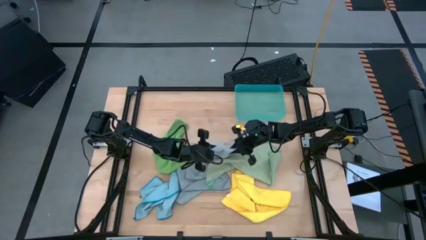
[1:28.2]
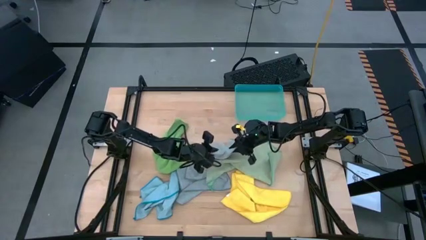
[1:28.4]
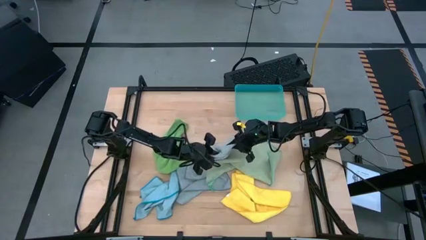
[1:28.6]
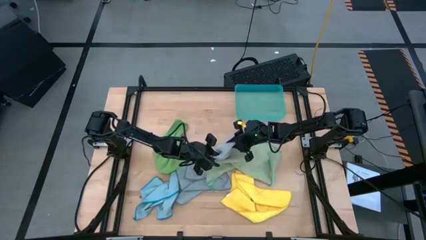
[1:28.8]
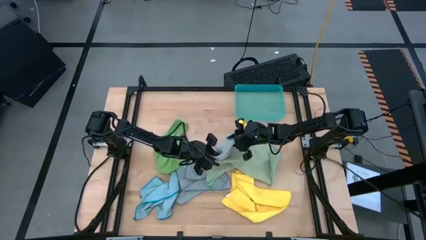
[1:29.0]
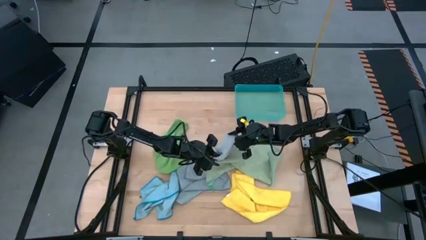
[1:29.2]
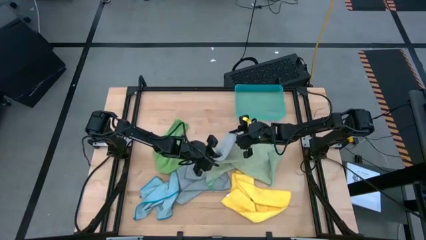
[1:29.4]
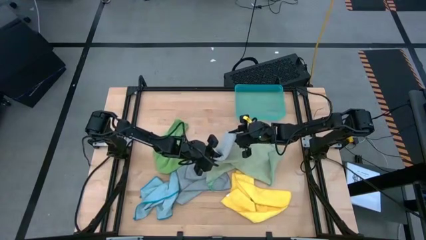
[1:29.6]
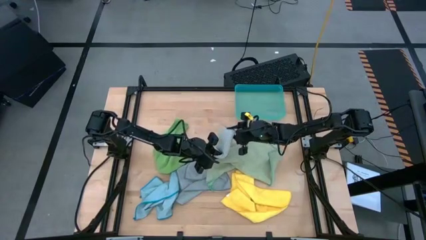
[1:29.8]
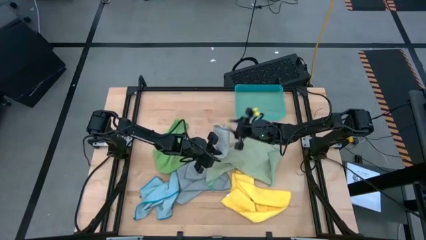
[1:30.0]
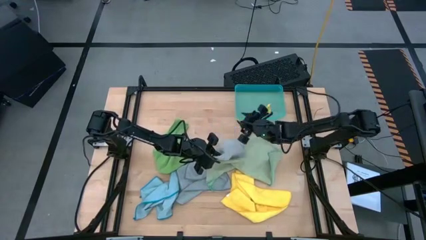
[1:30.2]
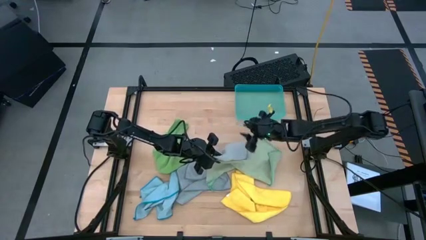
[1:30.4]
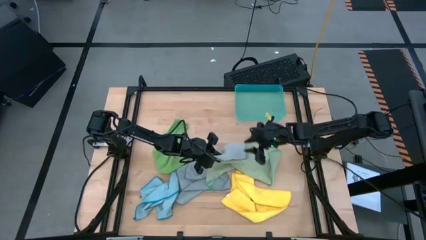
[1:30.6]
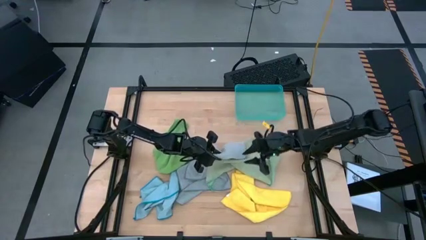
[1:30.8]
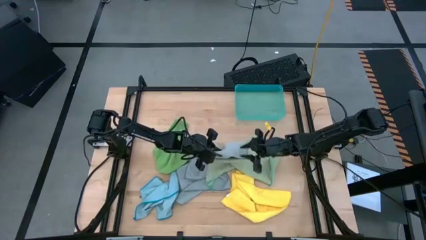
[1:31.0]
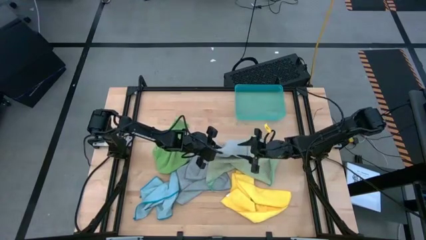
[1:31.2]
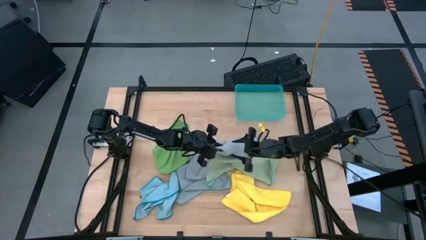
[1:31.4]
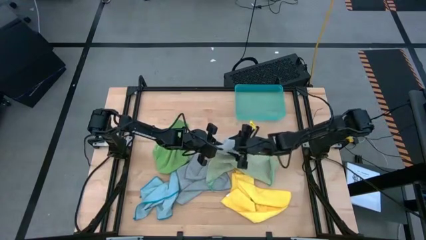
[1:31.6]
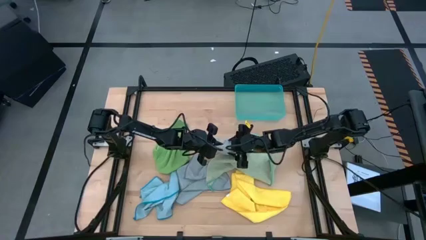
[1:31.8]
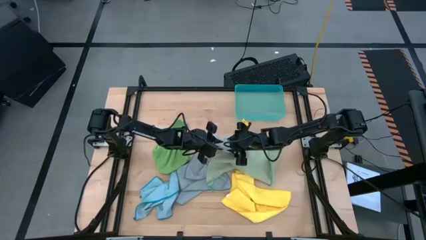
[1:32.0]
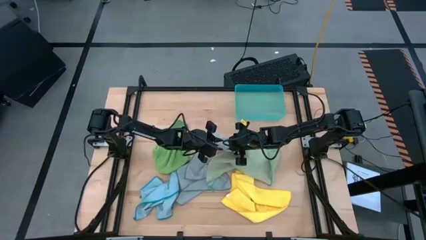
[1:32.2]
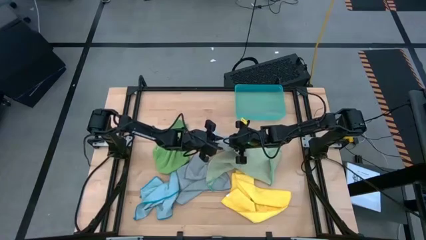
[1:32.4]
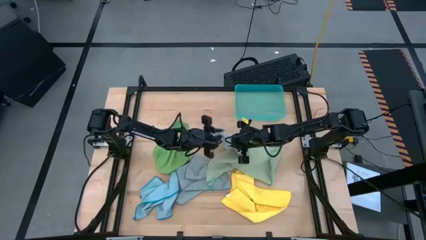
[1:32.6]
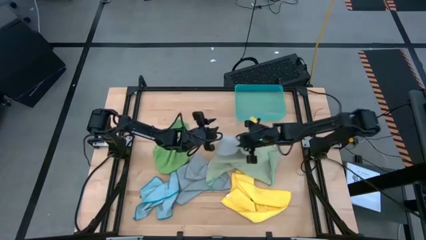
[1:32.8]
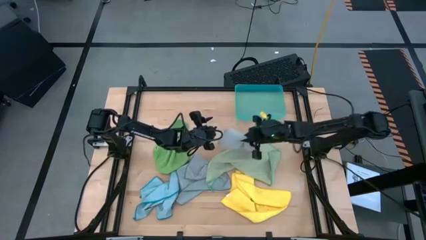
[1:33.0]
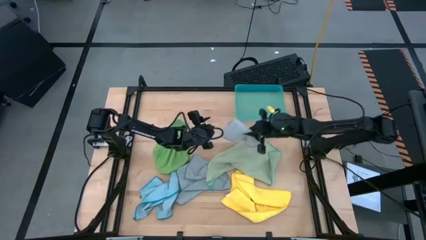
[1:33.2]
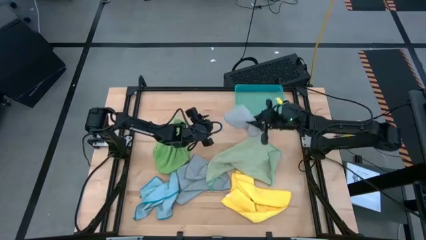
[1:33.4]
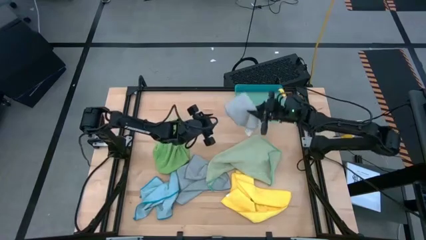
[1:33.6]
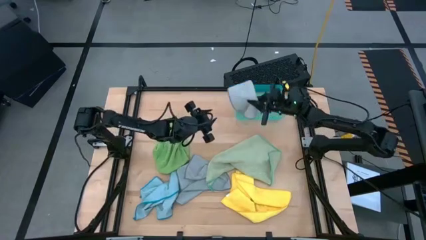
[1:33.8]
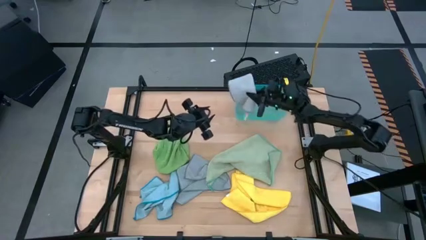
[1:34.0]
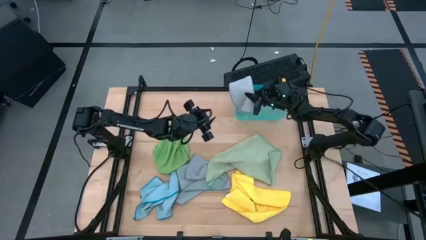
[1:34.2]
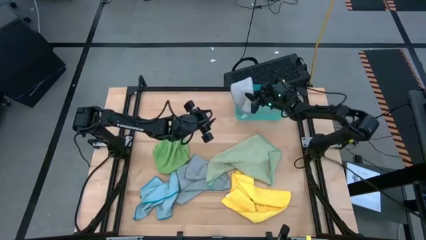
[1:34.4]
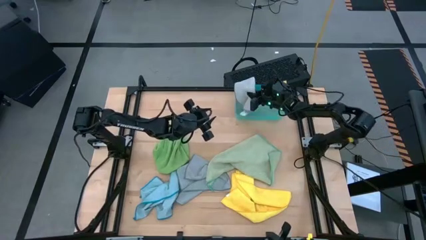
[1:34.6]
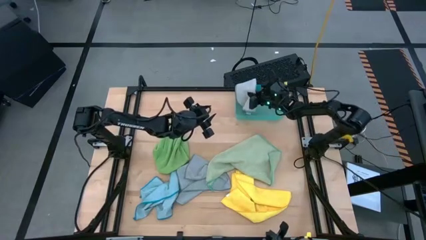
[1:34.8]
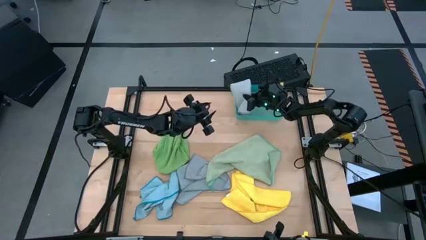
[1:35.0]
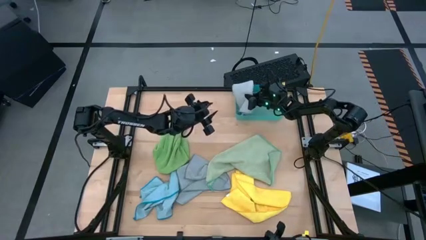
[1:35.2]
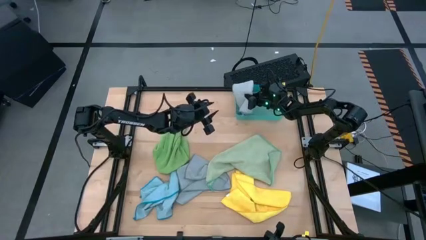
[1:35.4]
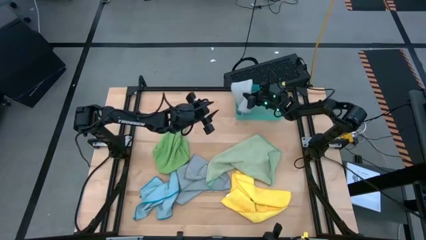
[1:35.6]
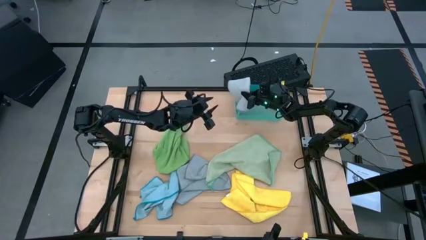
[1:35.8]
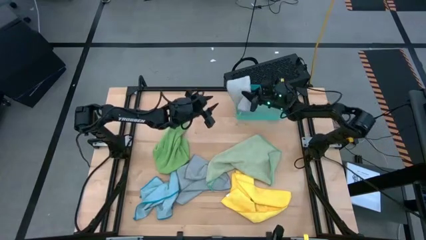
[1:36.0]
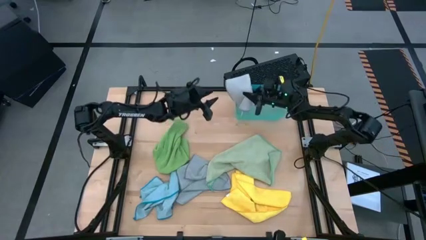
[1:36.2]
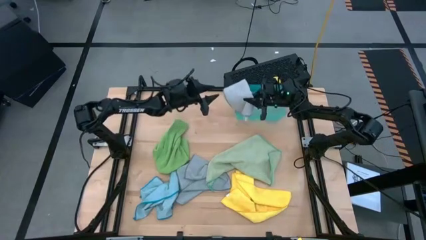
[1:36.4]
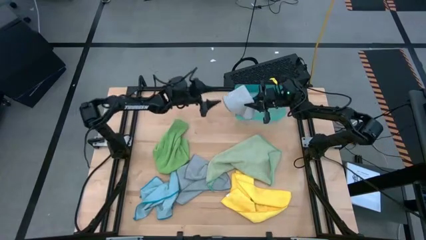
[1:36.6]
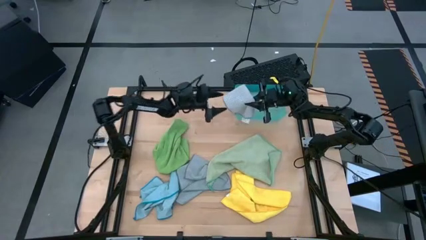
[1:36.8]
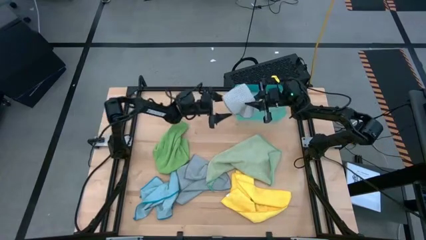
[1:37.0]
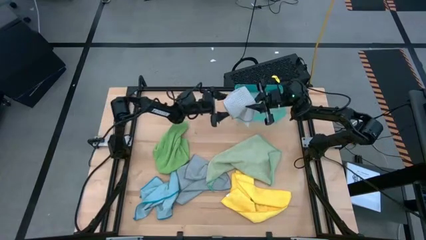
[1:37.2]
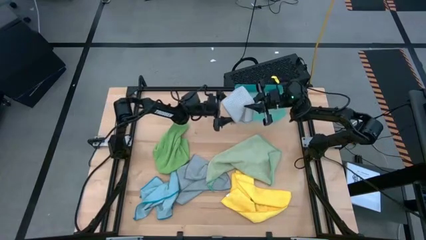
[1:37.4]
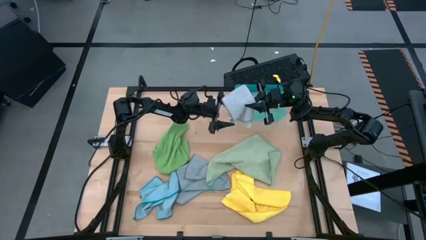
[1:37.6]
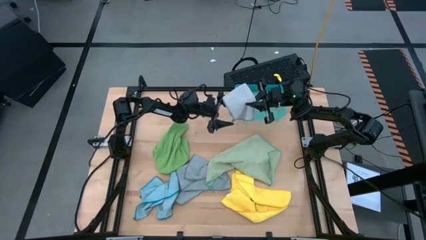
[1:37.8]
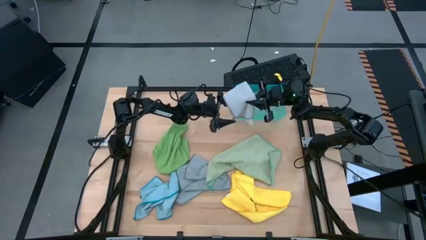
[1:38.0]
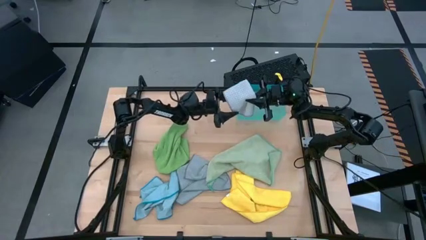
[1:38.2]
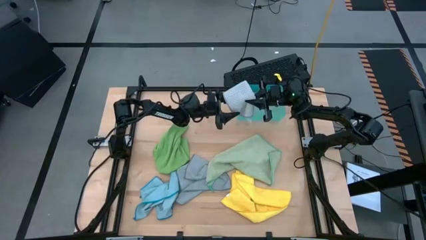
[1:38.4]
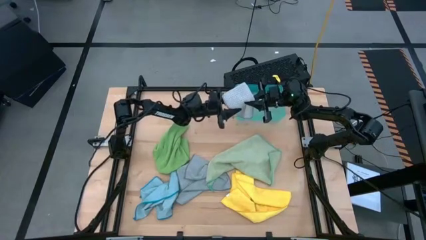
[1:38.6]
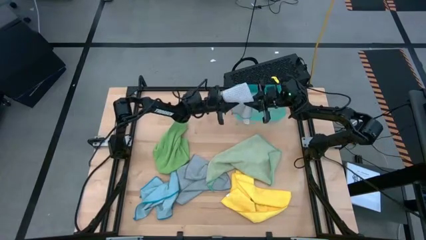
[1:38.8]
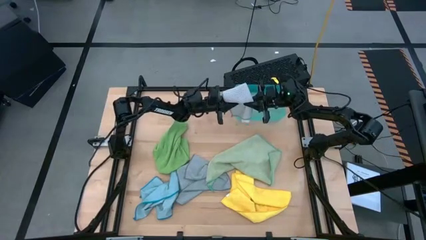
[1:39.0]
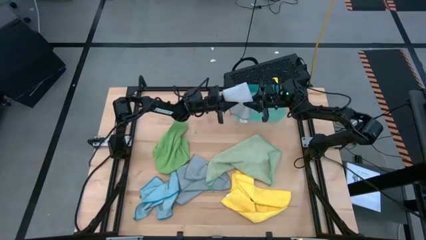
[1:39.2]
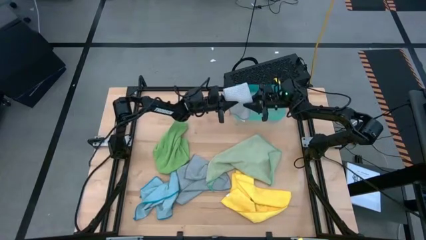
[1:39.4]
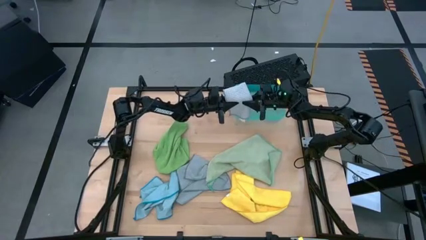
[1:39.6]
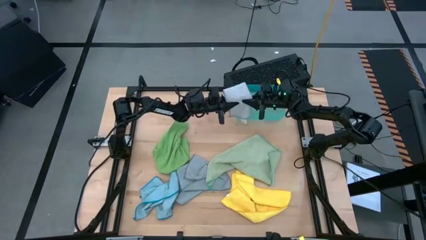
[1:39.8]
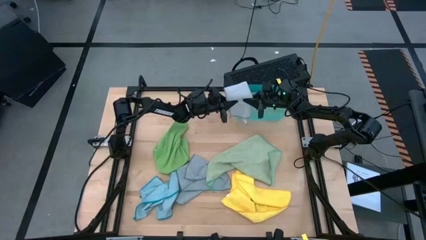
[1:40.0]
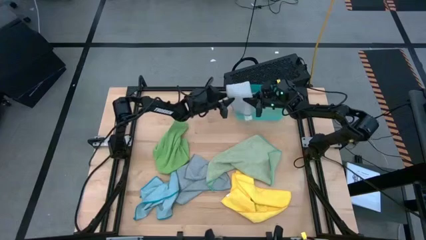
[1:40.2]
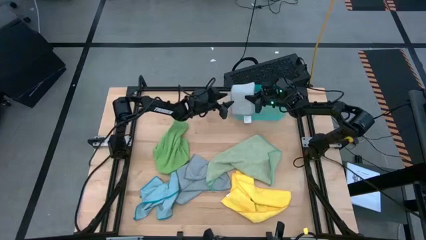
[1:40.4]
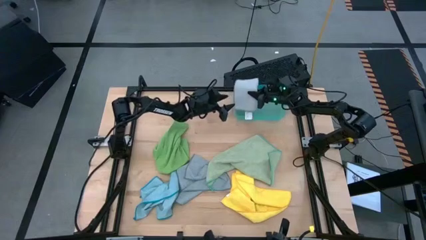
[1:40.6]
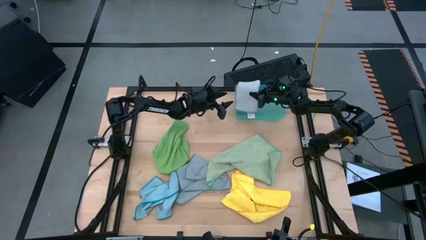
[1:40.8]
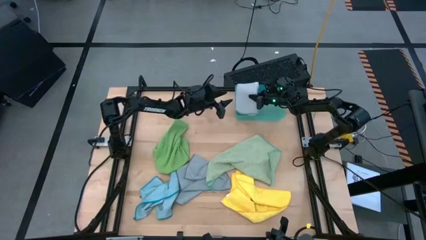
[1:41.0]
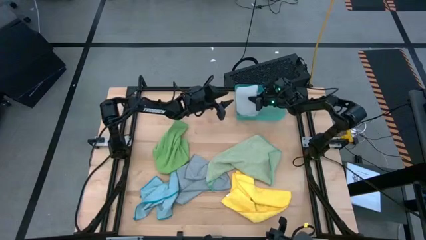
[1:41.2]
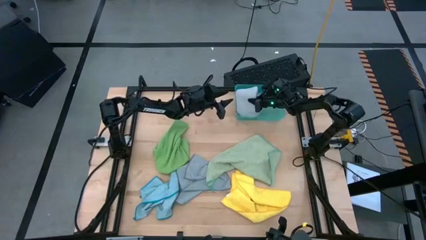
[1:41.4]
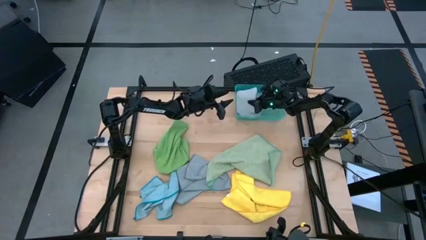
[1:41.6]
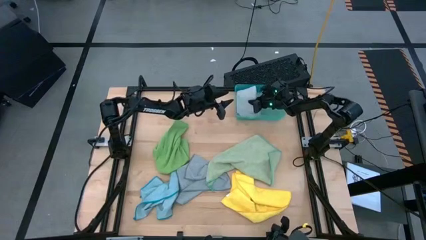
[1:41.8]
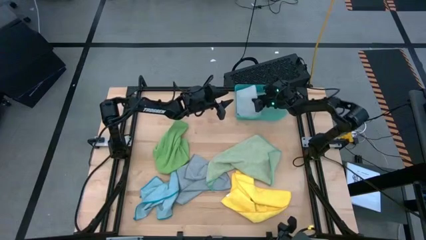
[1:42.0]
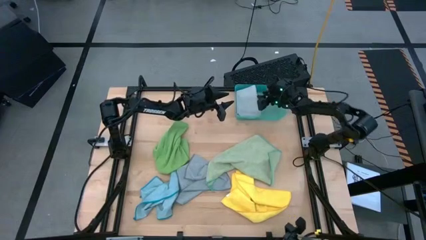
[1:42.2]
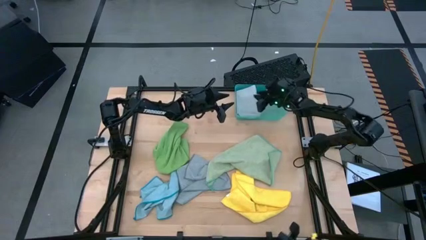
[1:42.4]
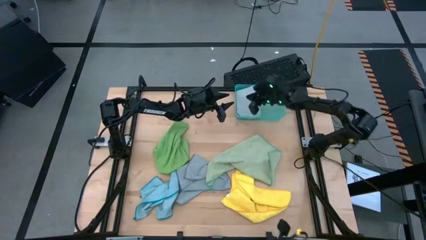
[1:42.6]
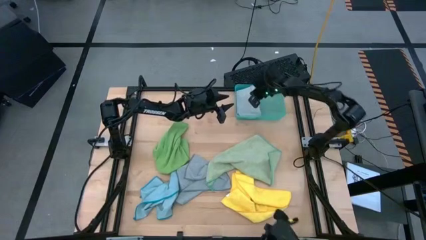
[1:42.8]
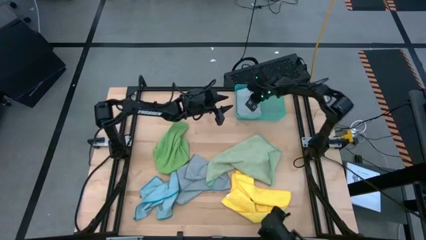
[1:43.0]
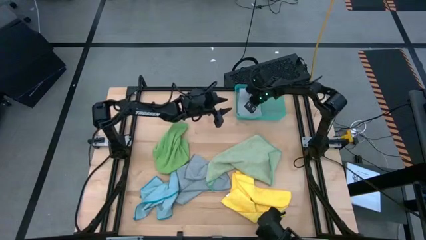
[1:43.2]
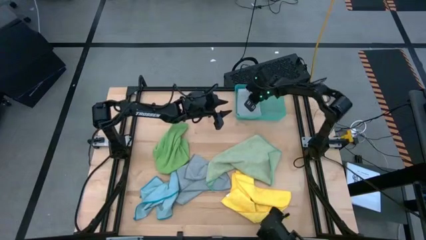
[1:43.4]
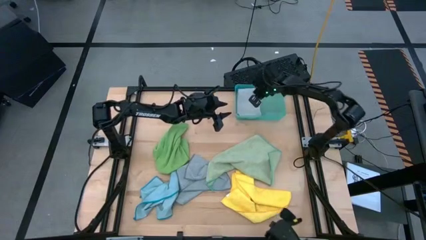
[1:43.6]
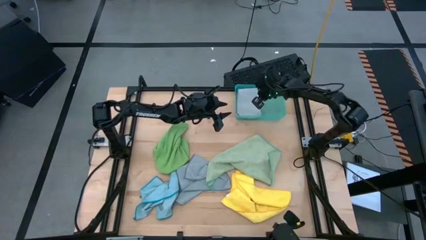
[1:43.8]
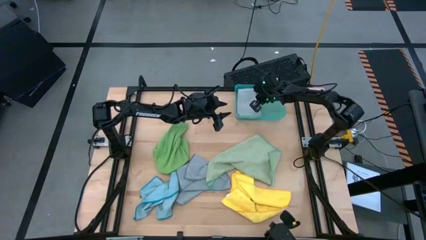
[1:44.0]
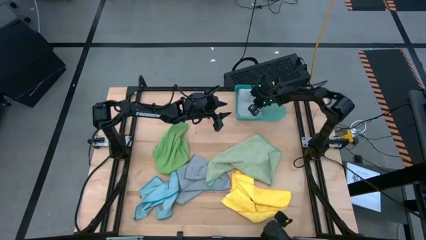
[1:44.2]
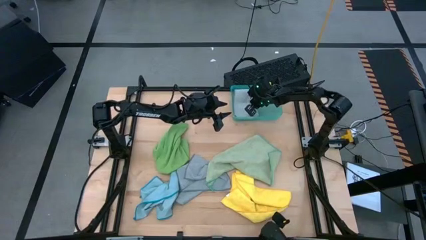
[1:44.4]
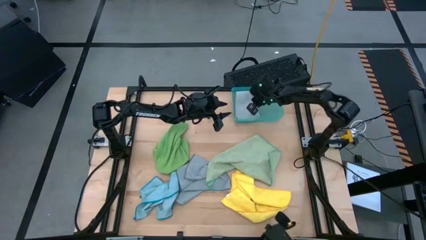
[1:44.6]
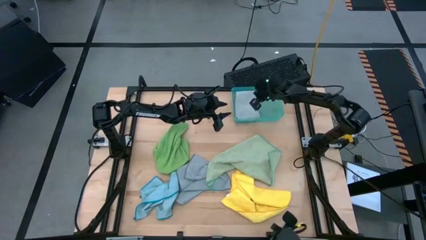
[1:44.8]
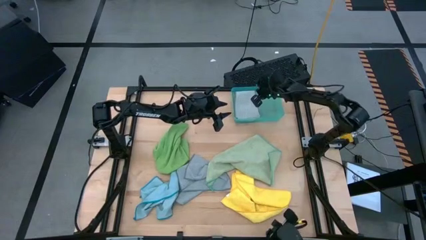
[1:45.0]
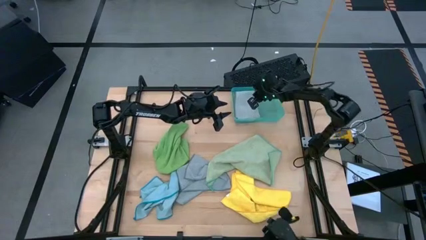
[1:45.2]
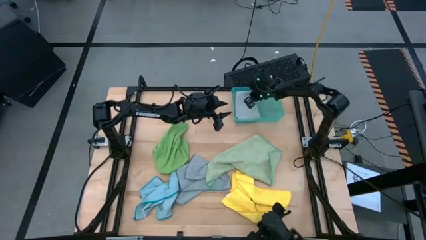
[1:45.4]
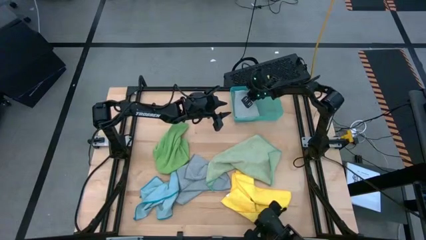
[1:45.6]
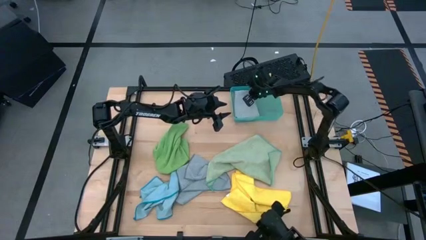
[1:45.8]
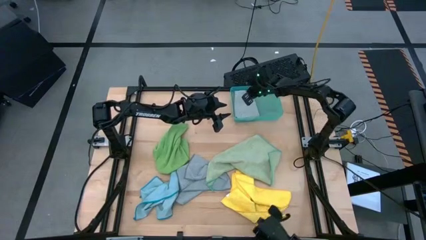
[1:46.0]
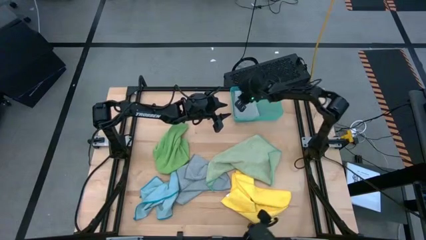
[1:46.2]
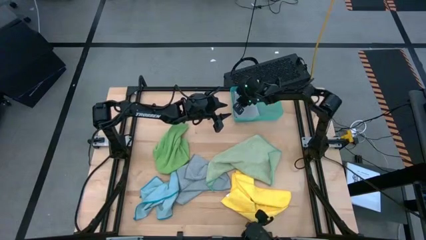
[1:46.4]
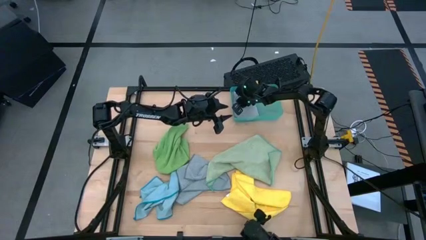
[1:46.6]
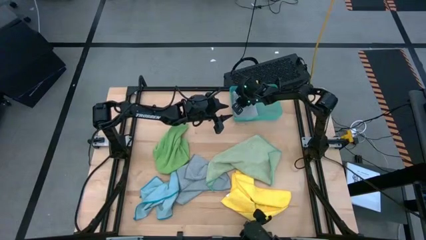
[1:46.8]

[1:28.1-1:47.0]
Task: Fold microfiber towels
Put the folded gray microfiber cloth into the bin
